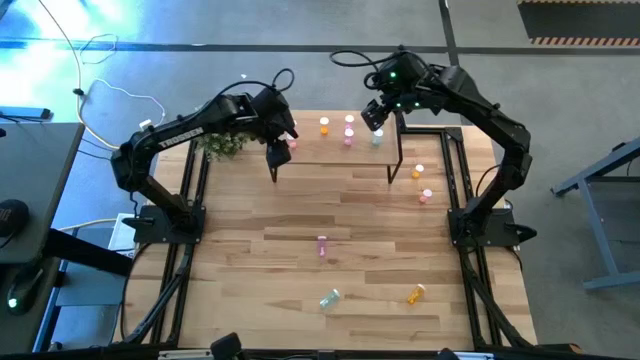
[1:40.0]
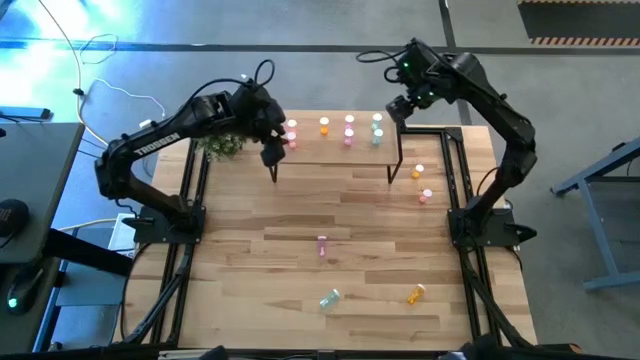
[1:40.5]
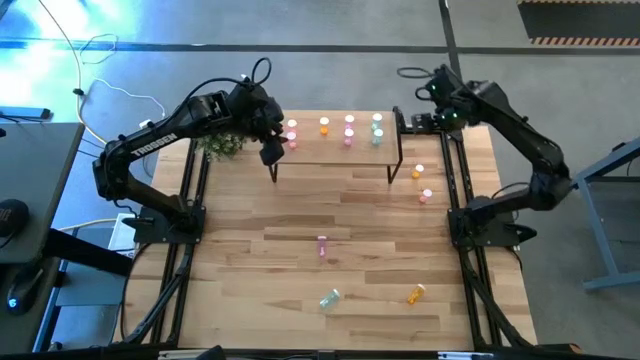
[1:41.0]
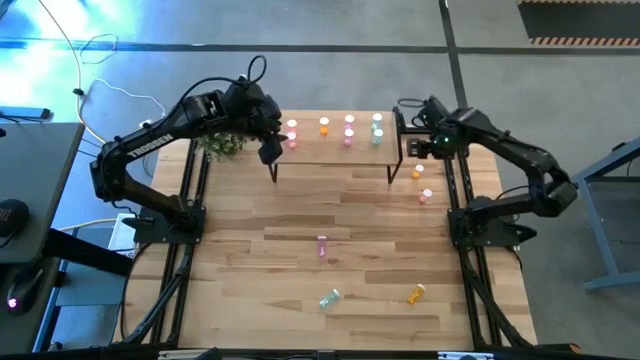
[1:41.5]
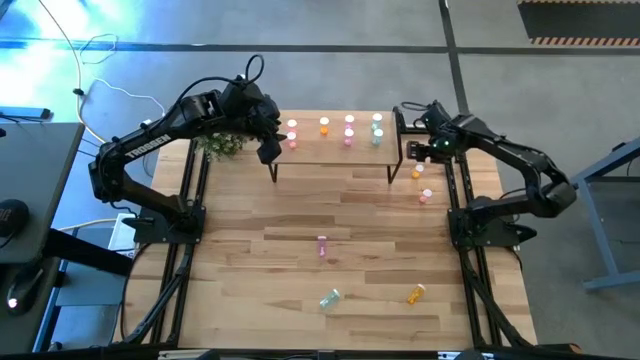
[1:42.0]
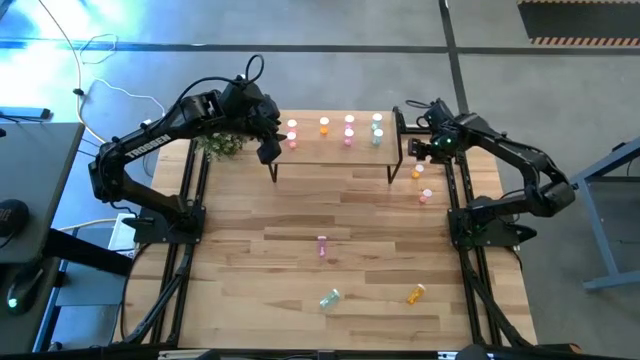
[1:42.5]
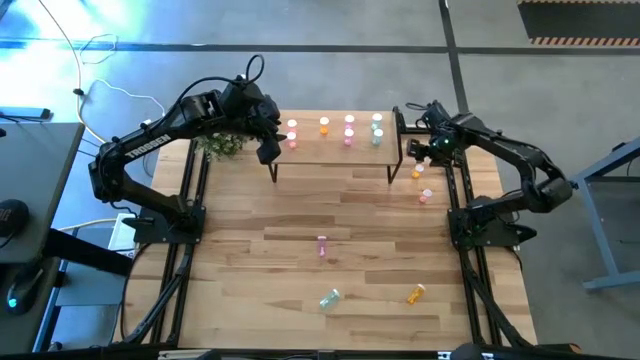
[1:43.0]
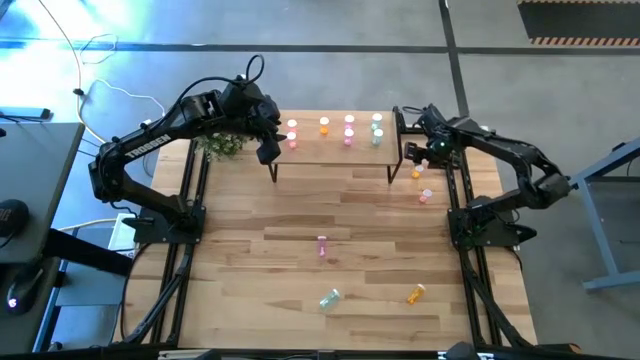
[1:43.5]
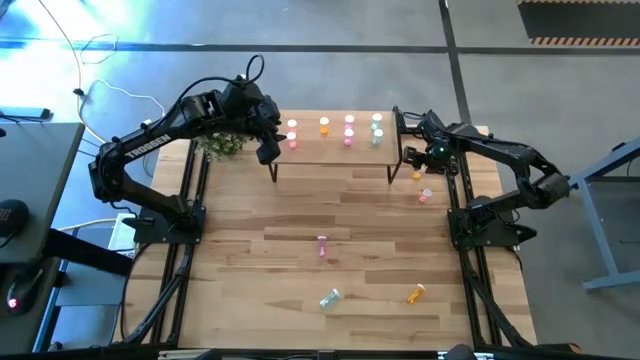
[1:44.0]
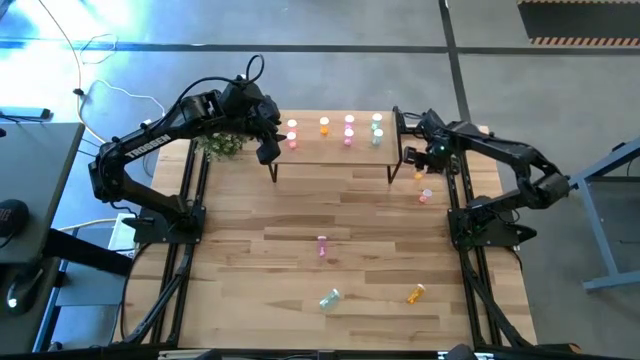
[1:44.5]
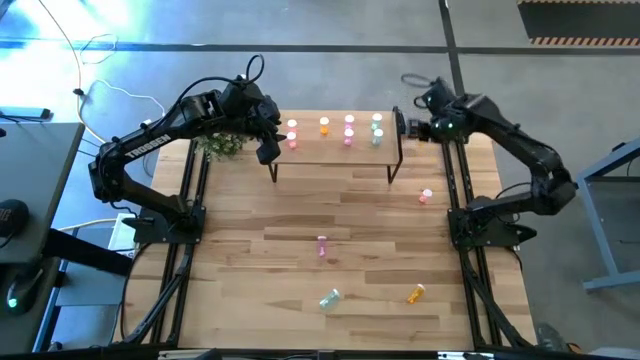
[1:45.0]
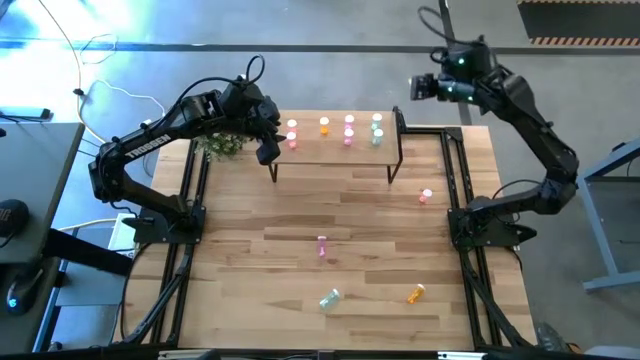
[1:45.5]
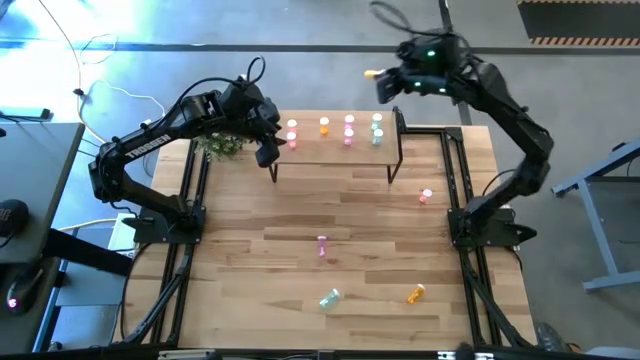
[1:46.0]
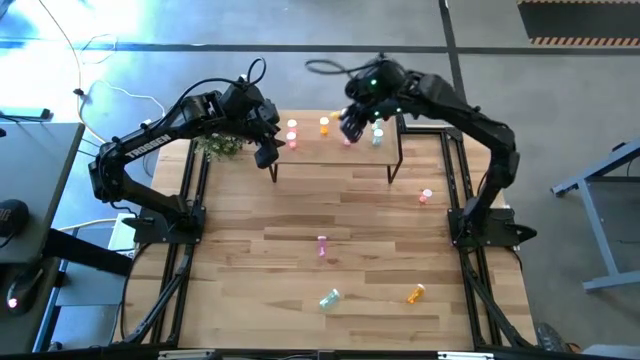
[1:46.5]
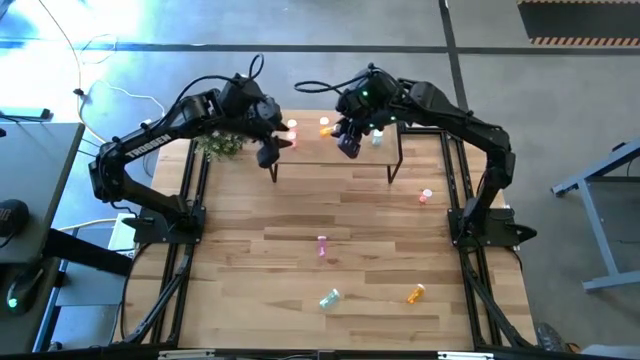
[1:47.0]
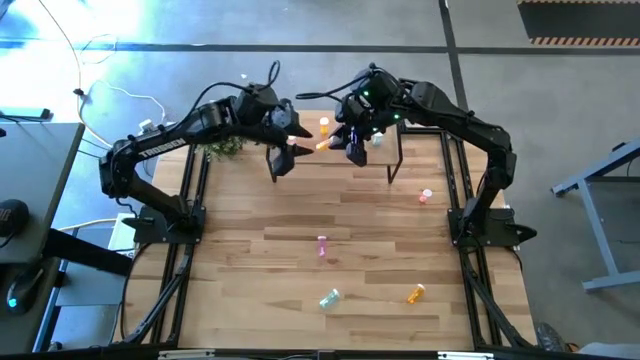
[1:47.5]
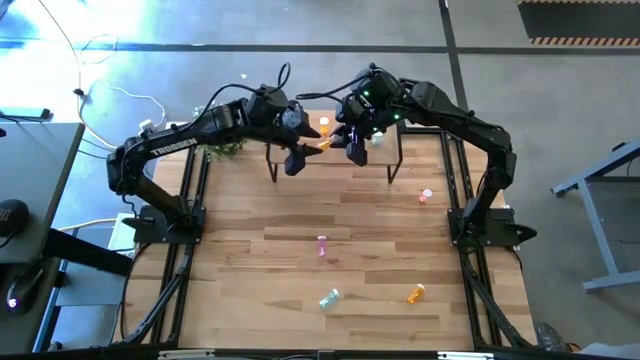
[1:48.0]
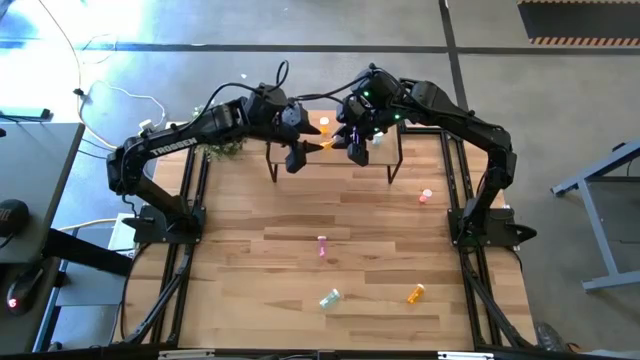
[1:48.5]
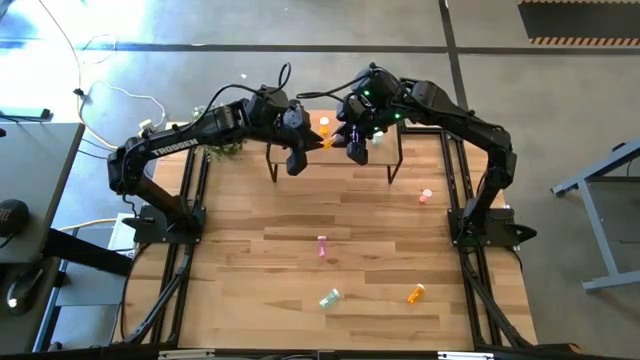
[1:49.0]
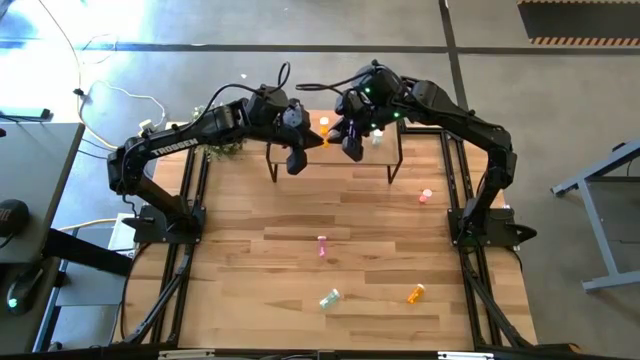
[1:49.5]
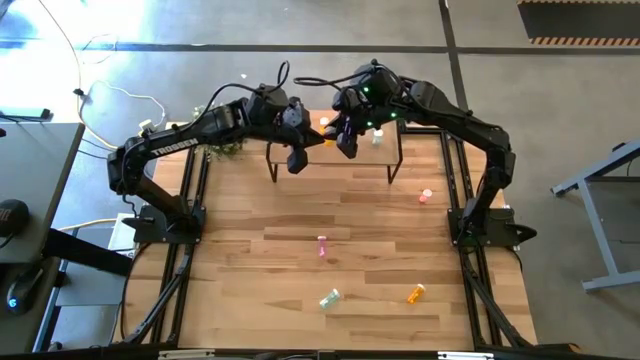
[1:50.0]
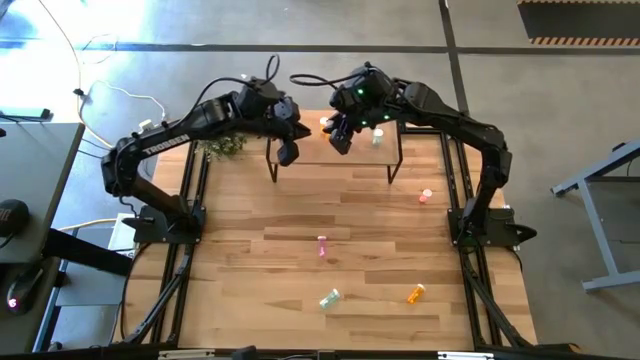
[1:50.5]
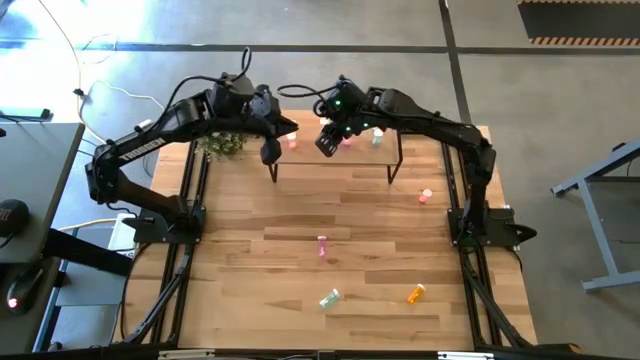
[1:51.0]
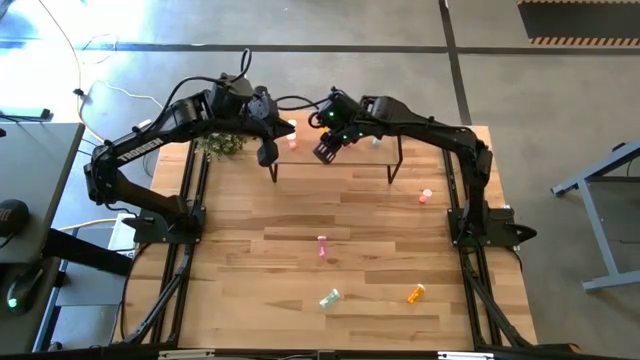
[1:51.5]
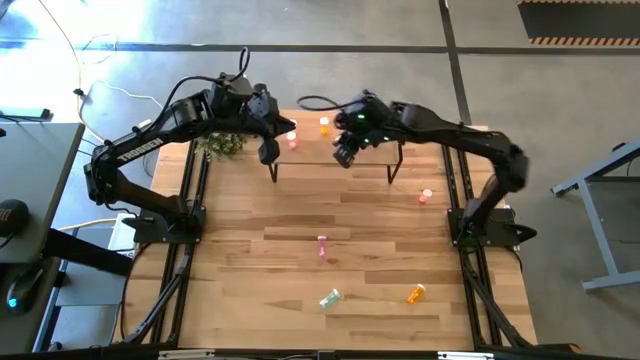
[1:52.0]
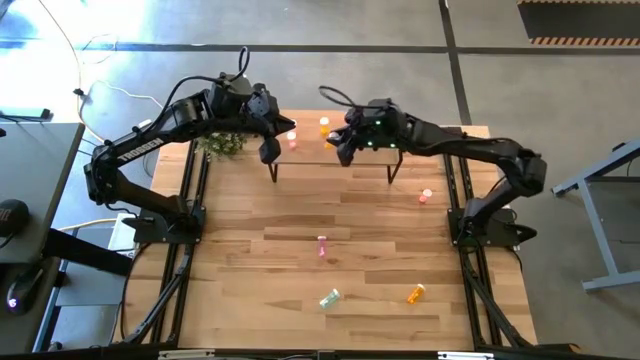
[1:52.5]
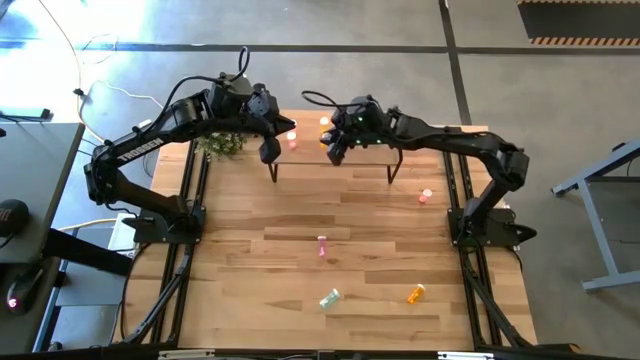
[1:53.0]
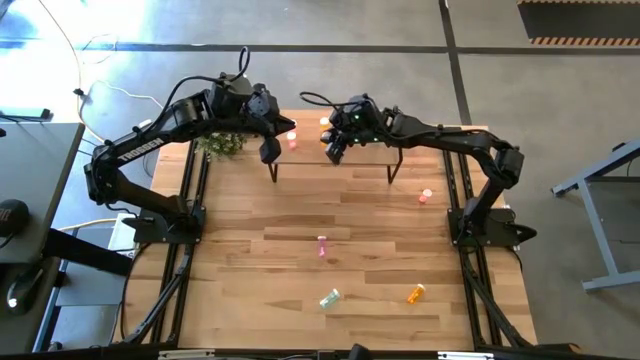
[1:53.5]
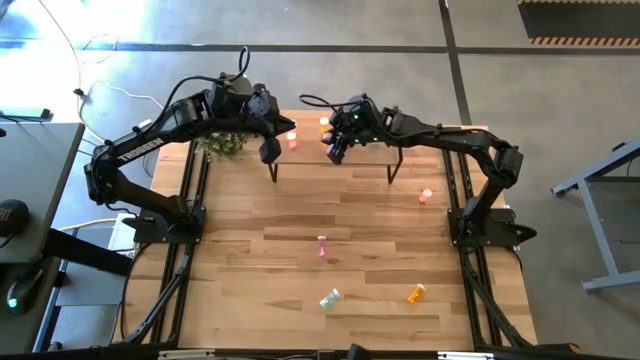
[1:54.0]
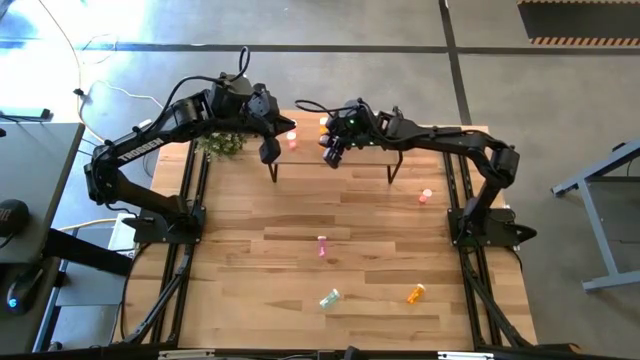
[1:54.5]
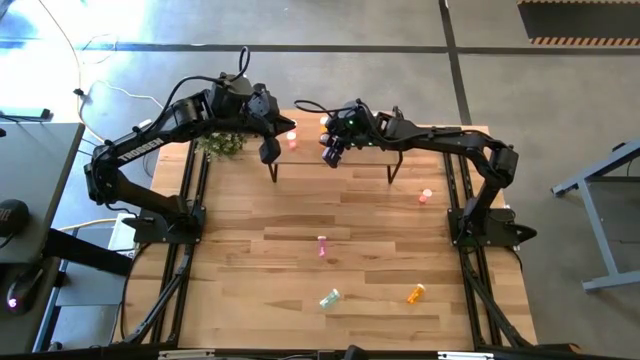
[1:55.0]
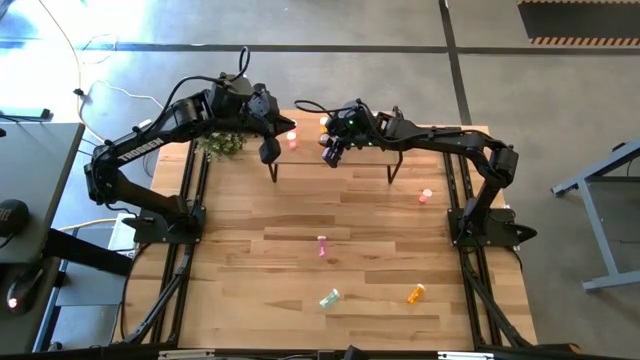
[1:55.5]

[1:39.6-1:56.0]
Task: Pick and place medicine bottles onto shelf by color
Put the top orange pill bottle on the shelf aligned with the other orange pill bottle

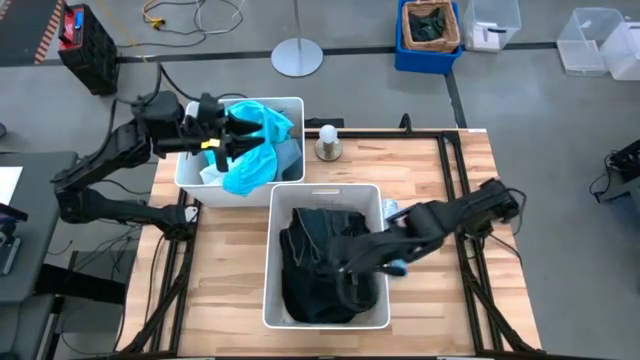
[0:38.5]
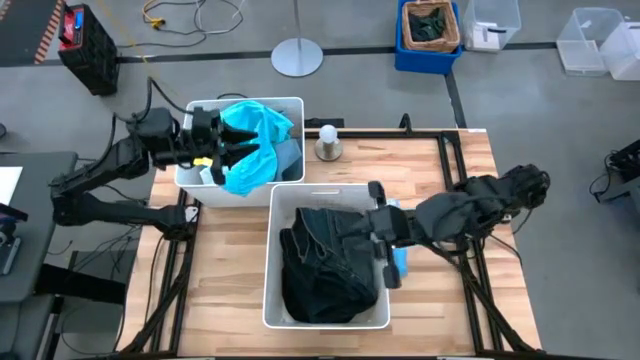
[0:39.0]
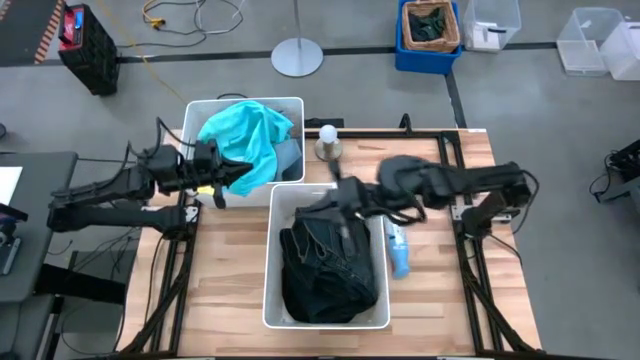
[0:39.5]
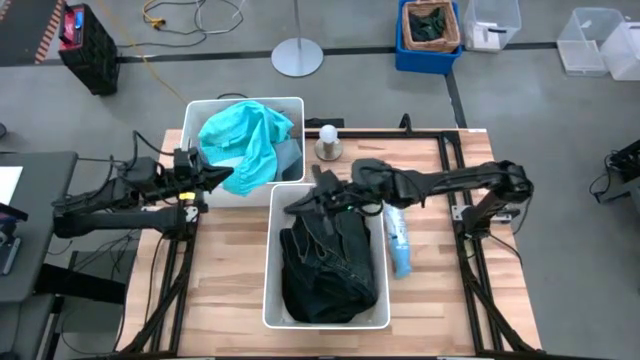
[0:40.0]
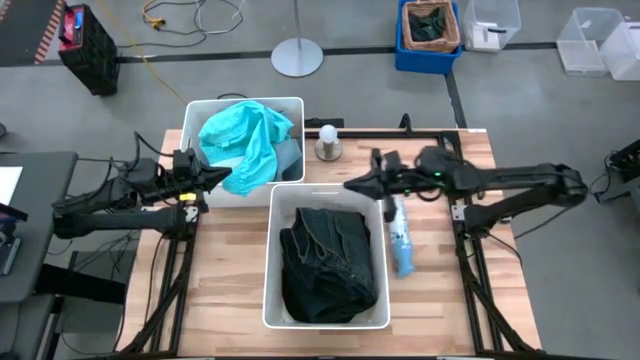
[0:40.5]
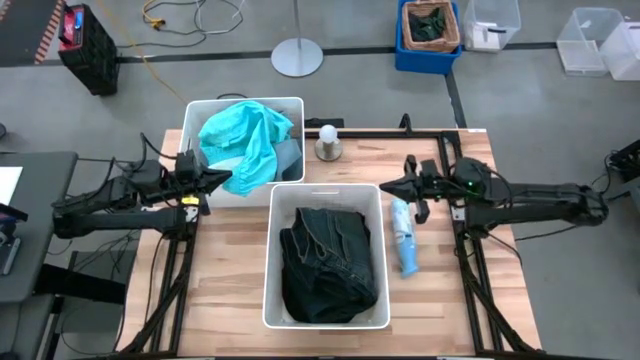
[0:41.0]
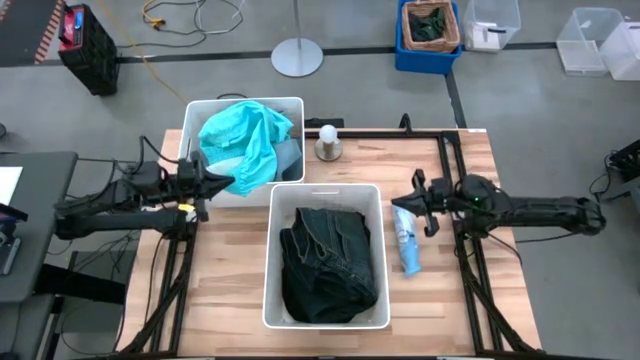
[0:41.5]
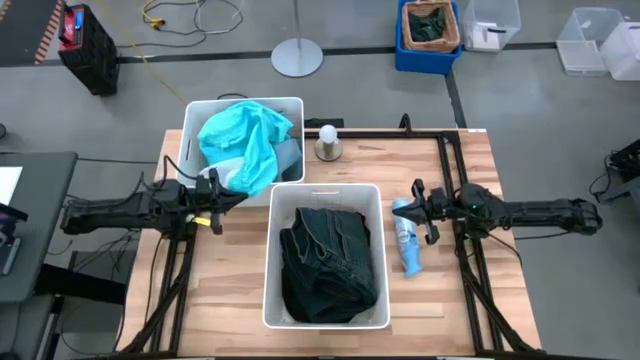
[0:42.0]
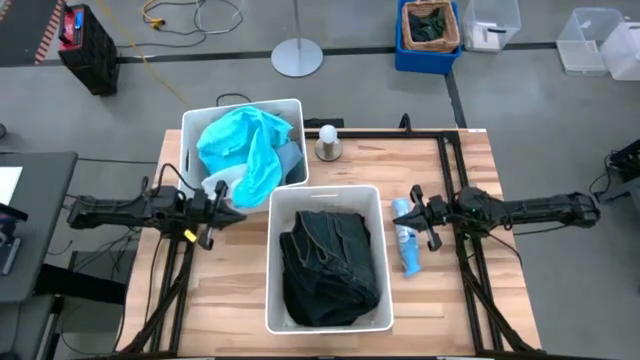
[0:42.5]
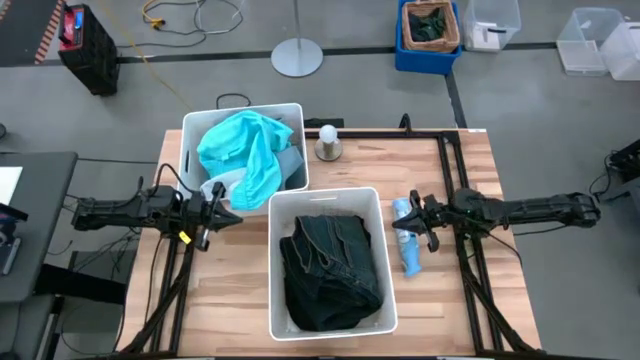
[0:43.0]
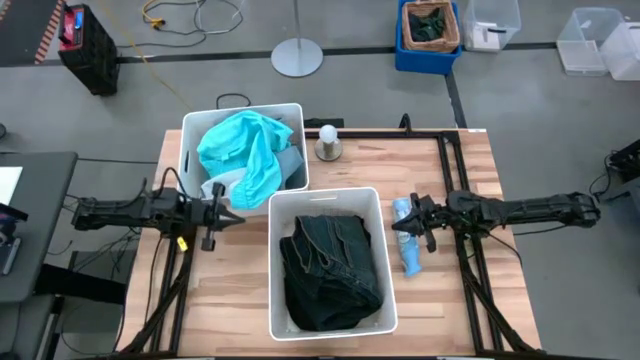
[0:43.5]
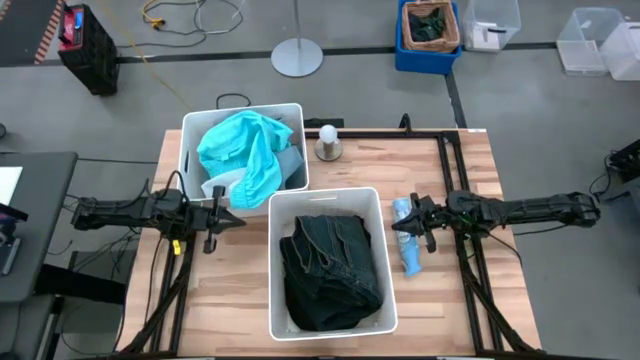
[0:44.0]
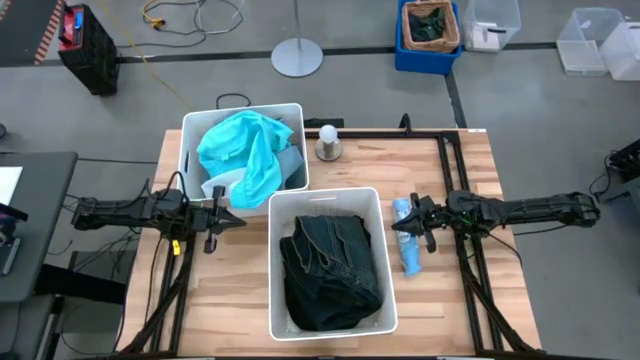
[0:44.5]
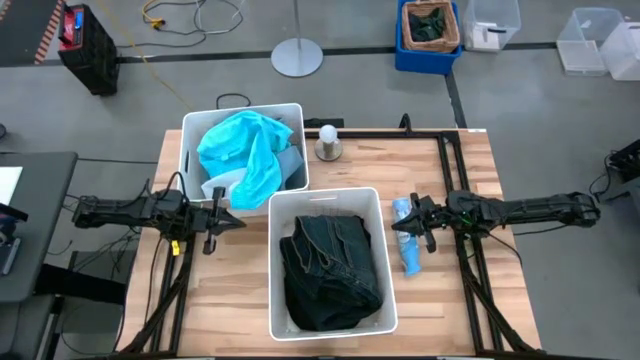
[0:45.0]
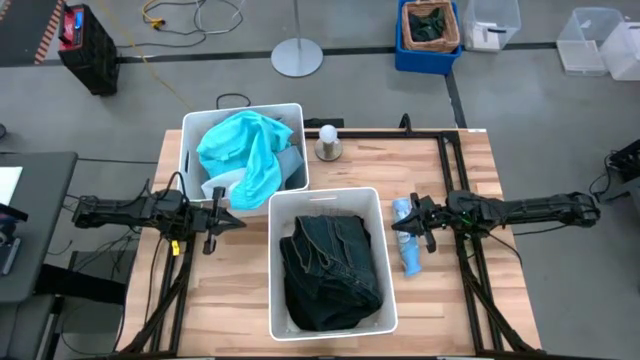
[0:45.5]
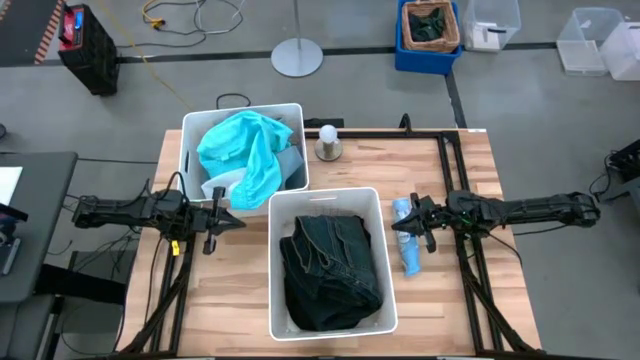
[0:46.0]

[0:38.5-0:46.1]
Task: Sort clothes
Return to Home Position
